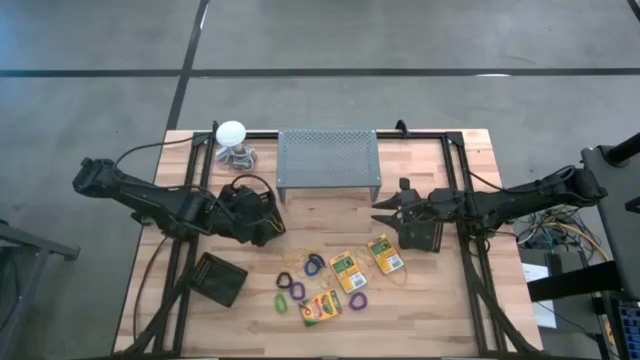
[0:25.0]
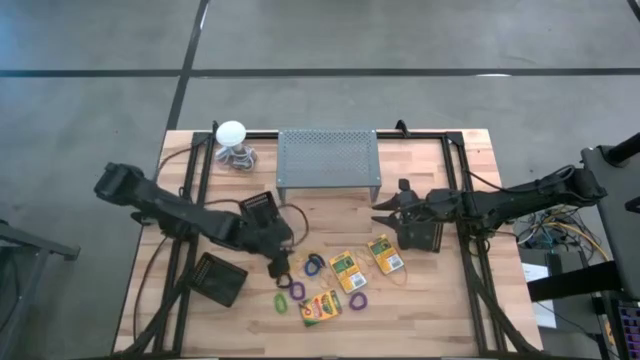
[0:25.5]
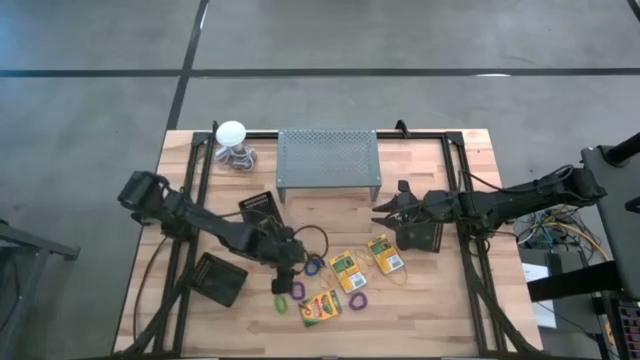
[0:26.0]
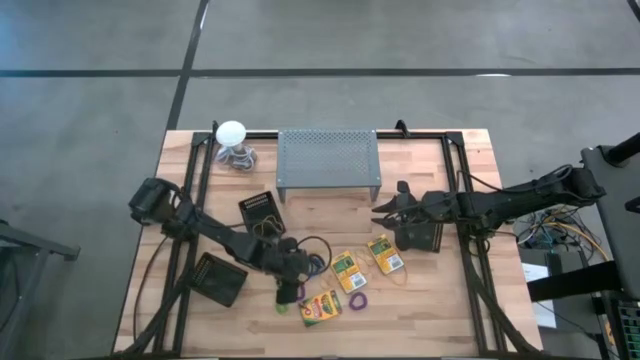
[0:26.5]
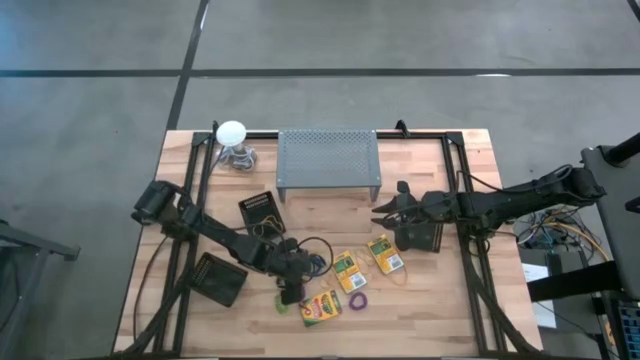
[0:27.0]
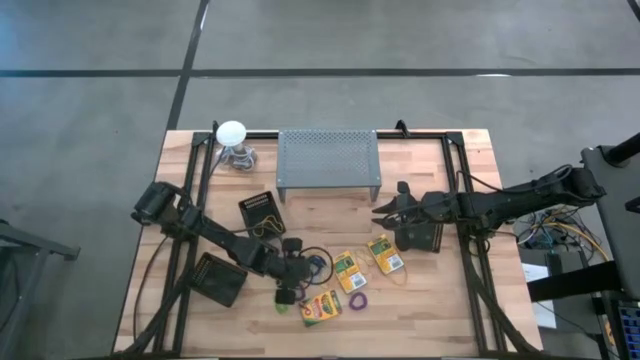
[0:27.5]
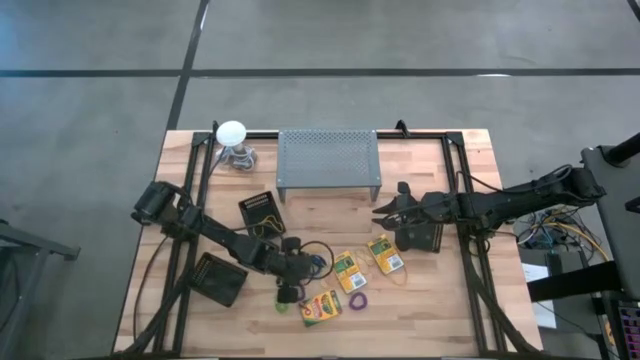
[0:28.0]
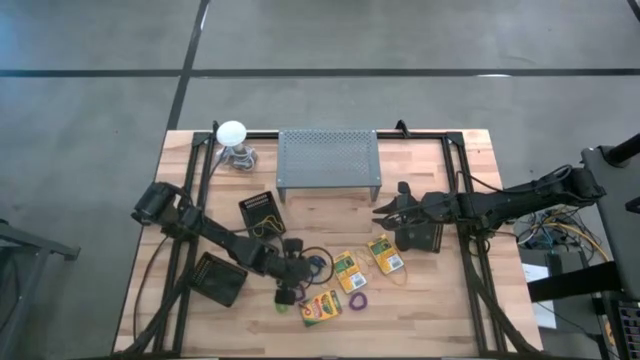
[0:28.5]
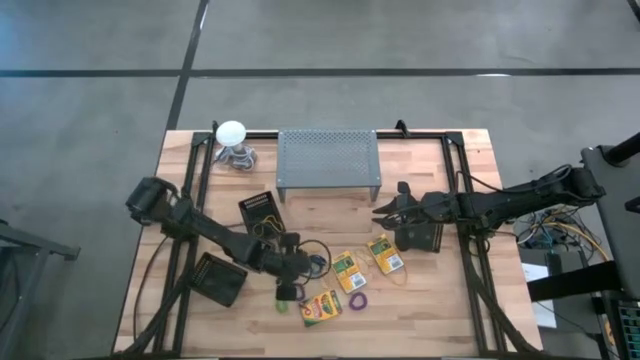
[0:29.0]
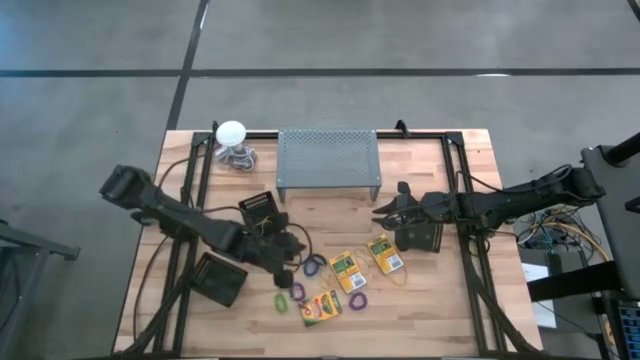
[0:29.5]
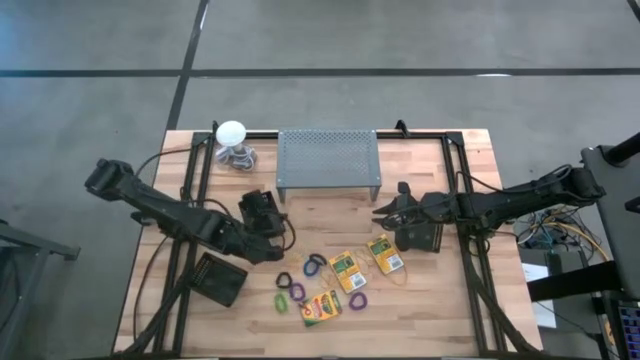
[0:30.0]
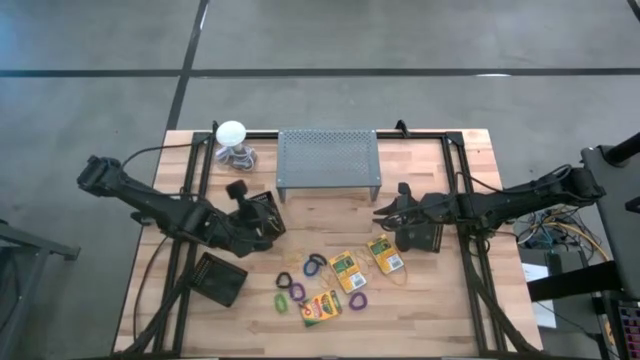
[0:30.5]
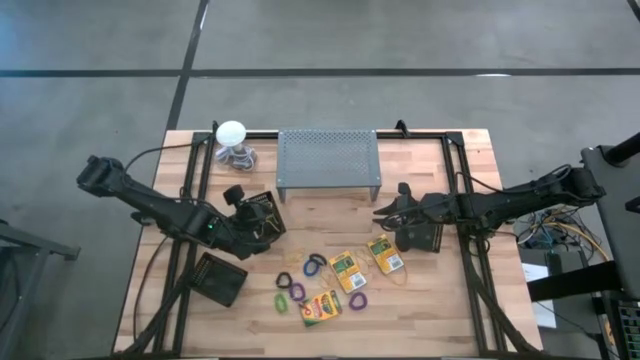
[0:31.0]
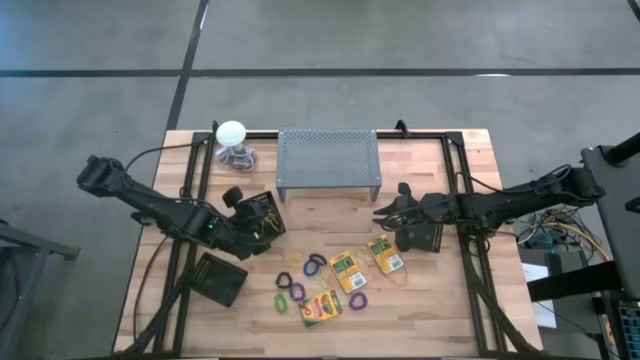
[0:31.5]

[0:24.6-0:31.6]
Task: Pick & Place Office Desk Supplies
Put the yellow rubber band into the top left black bin

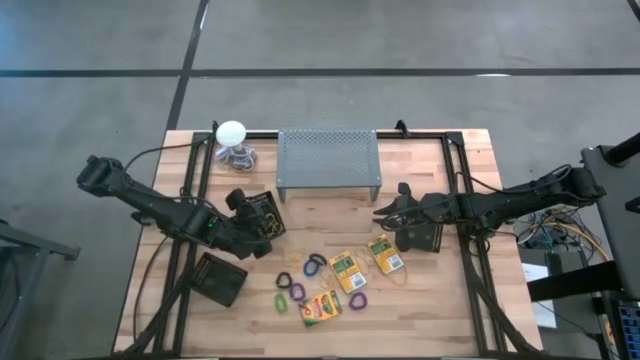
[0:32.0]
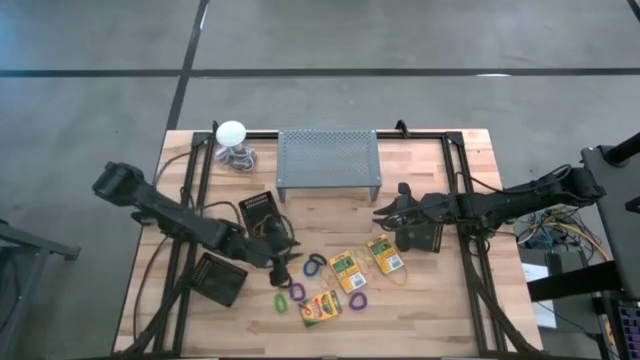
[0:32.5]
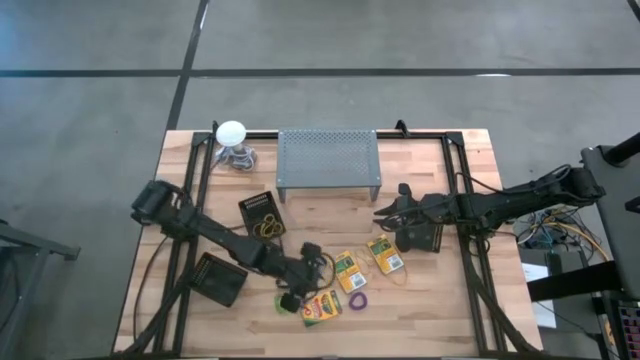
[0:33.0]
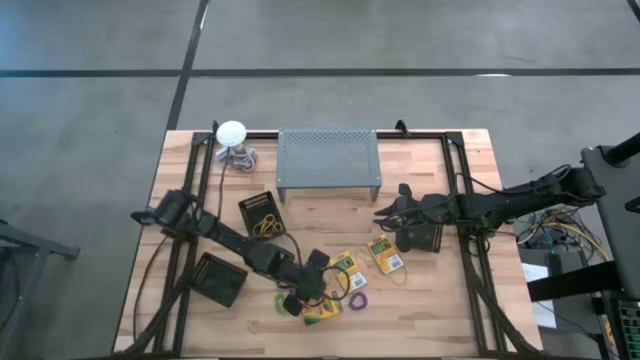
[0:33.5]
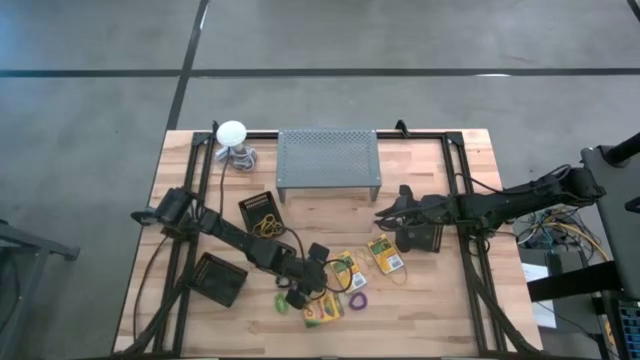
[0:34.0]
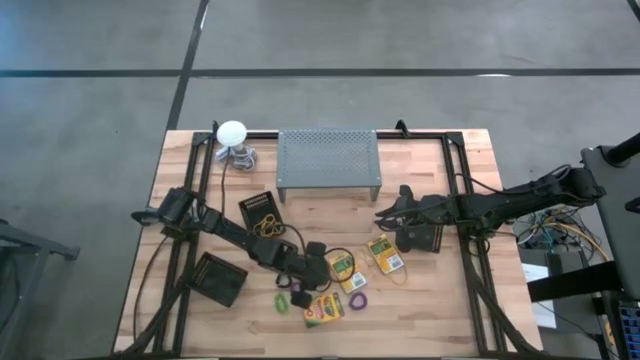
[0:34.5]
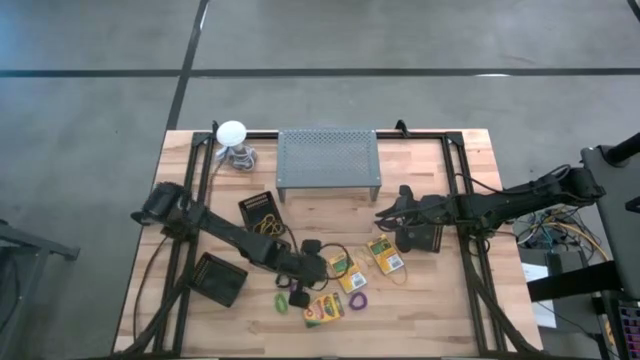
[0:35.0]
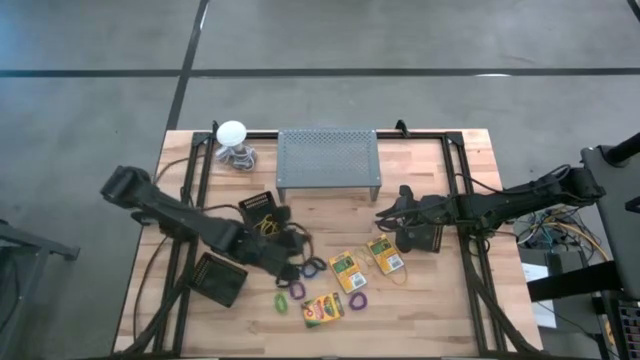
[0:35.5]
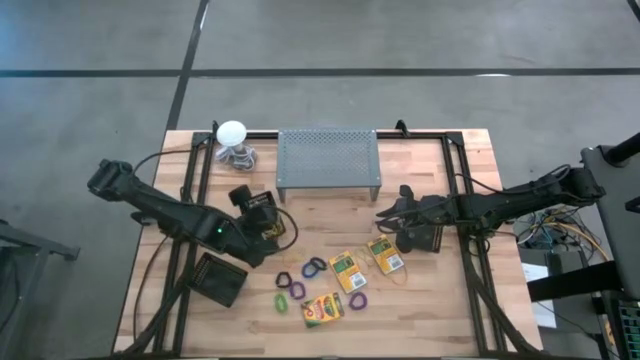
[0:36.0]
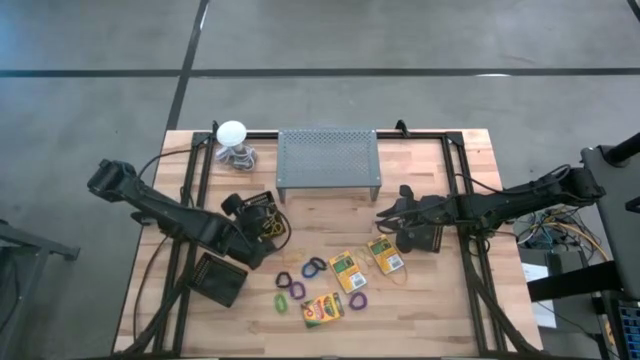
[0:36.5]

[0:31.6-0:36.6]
Put the yellow rubber band into the top left black bin

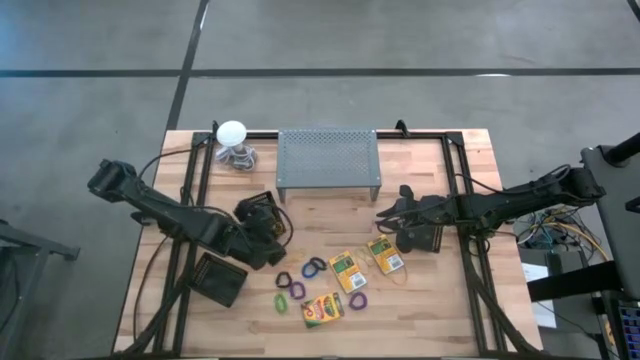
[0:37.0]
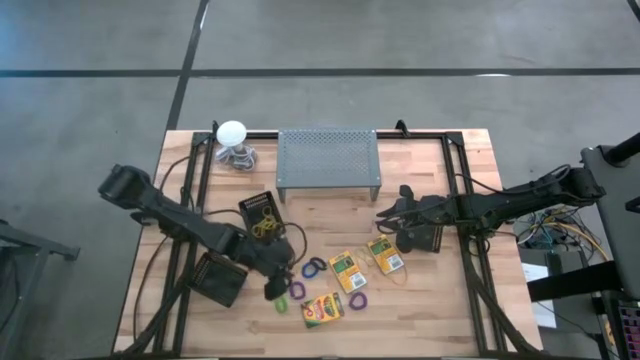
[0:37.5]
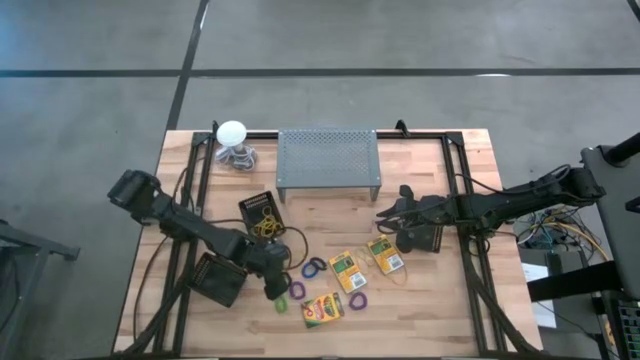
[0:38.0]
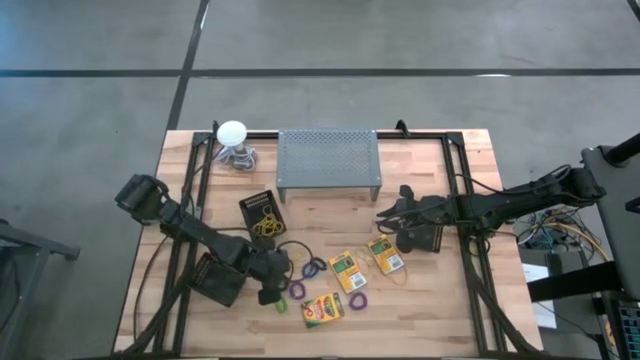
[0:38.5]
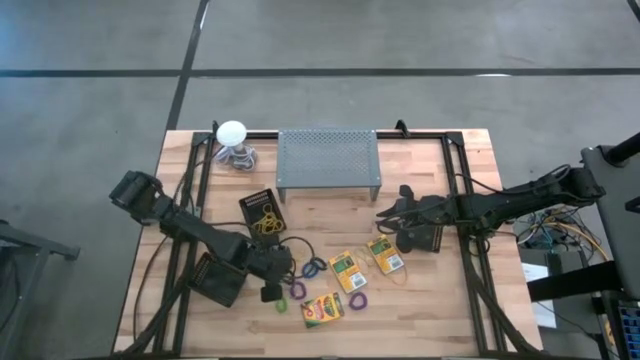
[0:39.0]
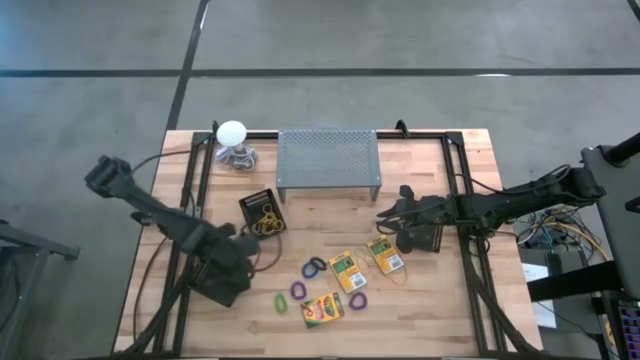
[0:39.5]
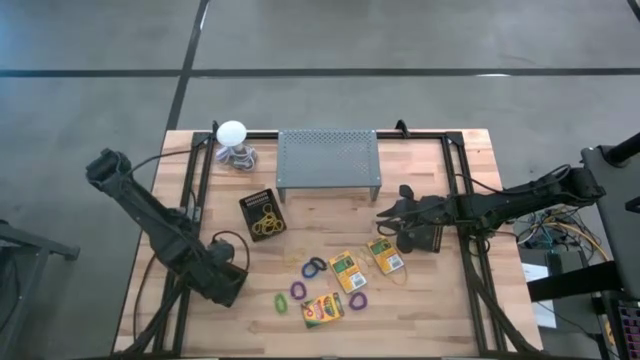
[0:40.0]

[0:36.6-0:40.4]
Put the black spring keychain into the bottom black bin

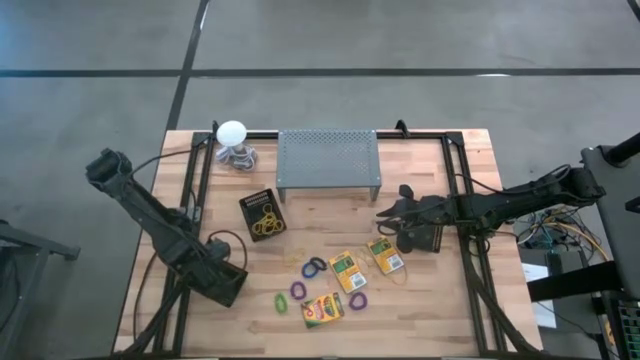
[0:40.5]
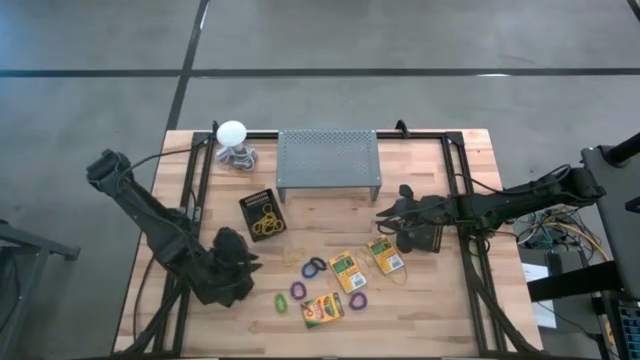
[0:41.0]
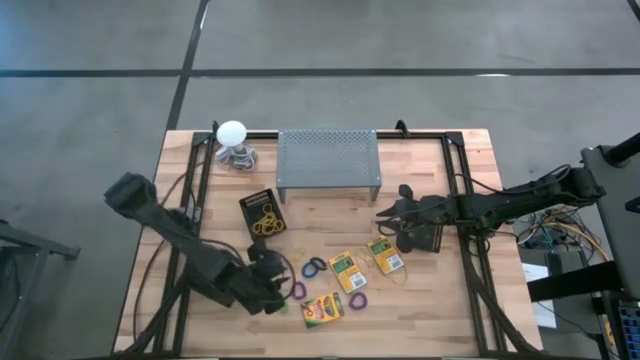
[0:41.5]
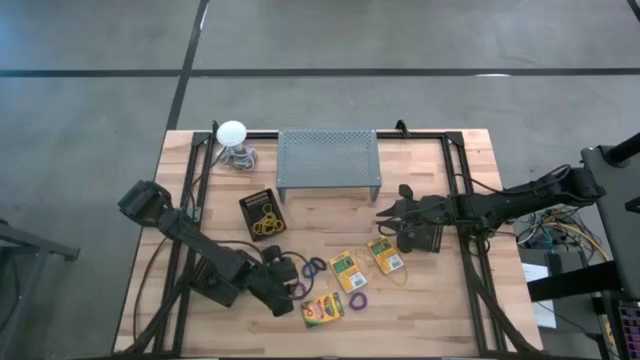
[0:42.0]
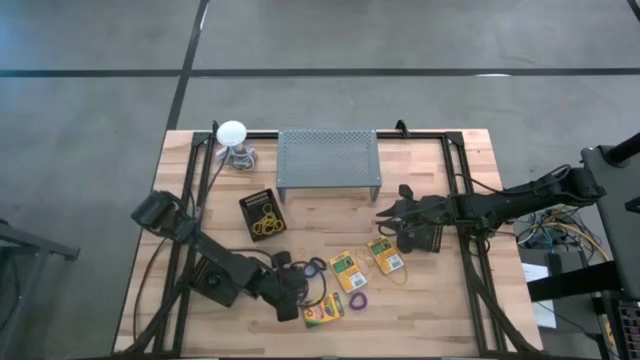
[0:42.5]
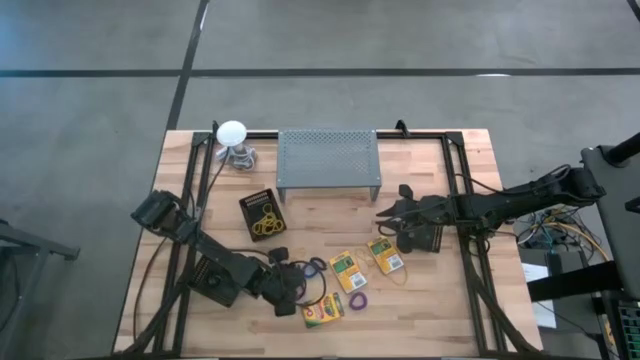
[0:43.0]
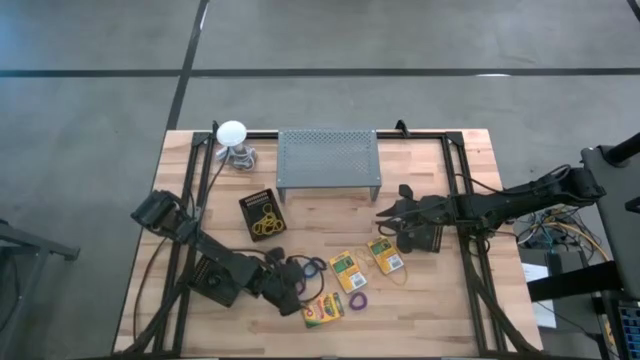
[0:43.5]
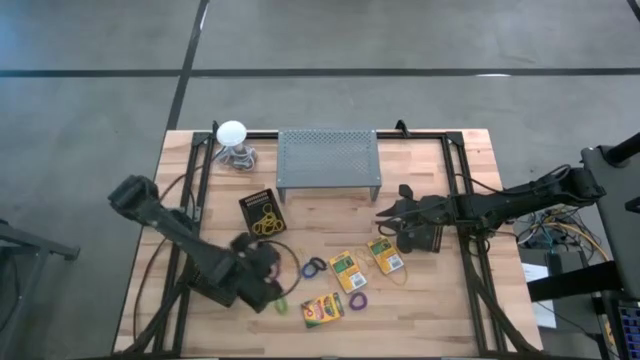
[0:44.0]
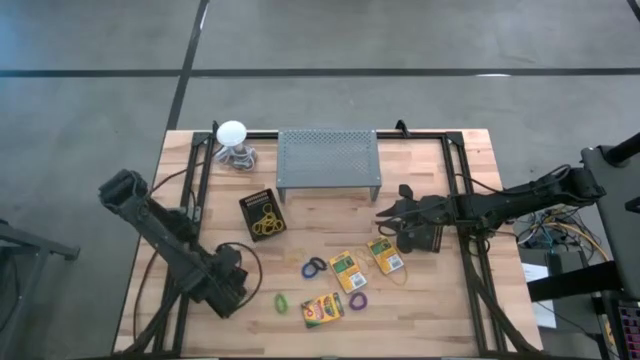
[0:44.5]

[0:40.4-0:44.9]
Put the purple spring keychain into the bottom black bin
